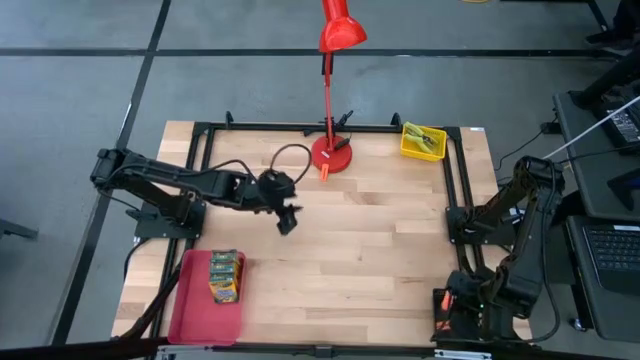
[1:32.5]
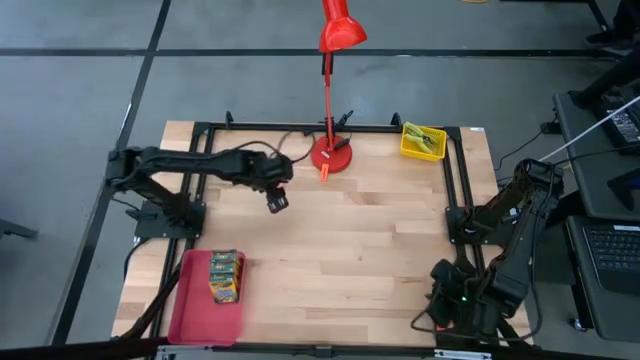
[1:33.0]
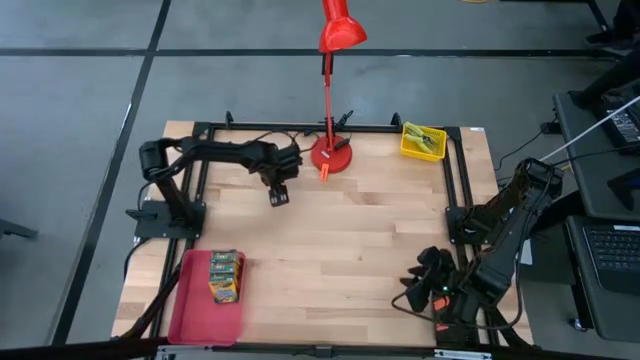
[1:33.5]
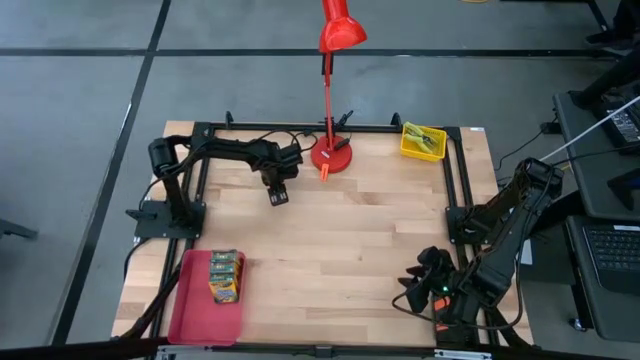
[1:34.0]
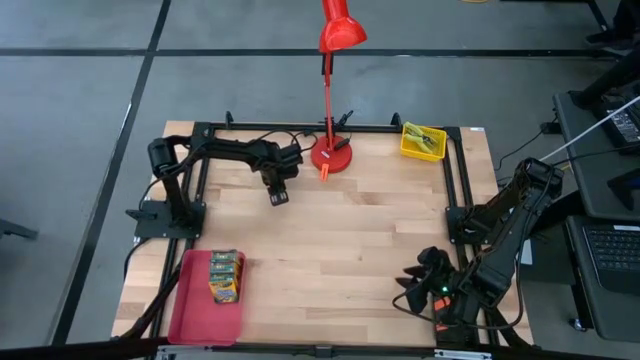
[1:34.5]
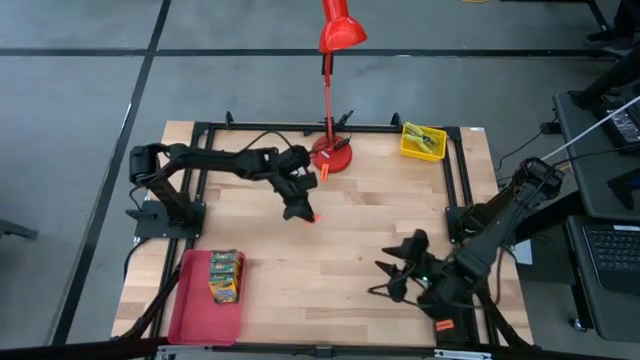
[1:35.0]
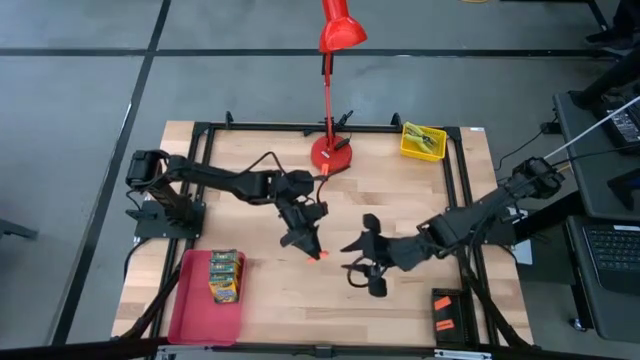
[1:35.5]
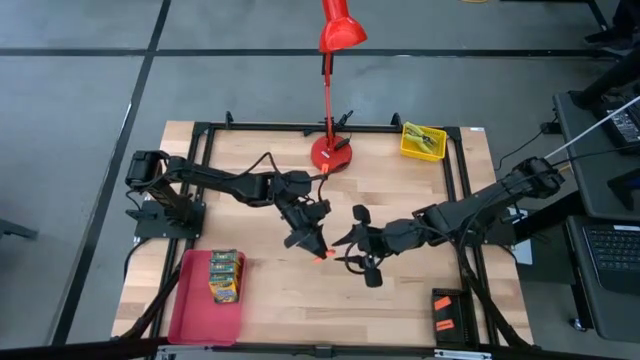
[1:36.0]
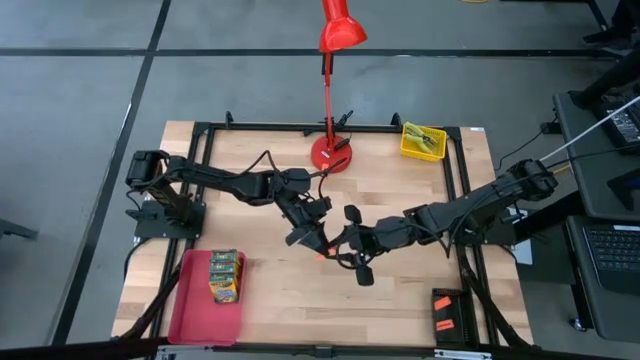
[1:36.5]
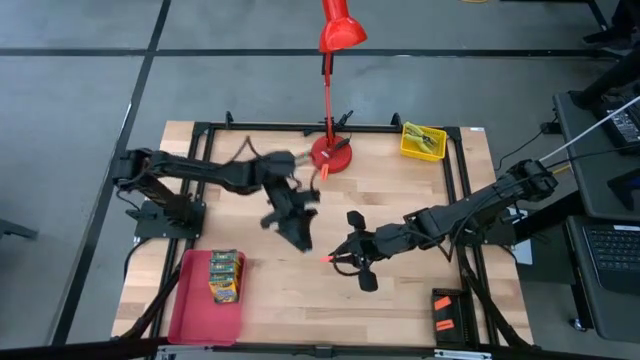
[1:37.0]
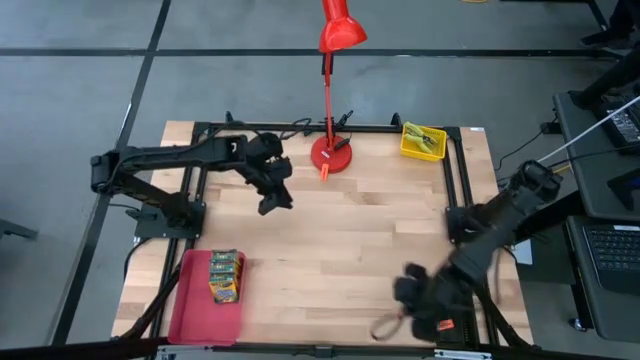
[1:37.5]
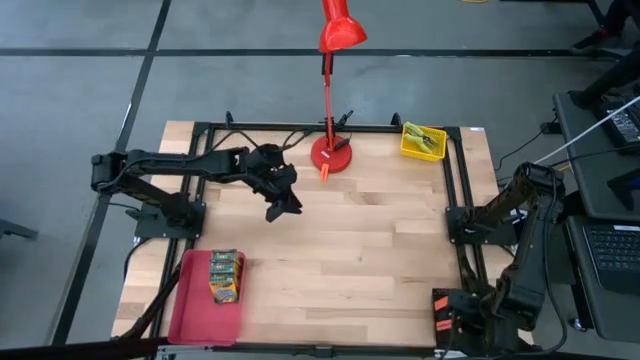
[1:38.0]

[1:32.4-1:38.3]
Task: Pick & Place School Supplies
Put the eraser into the black bin

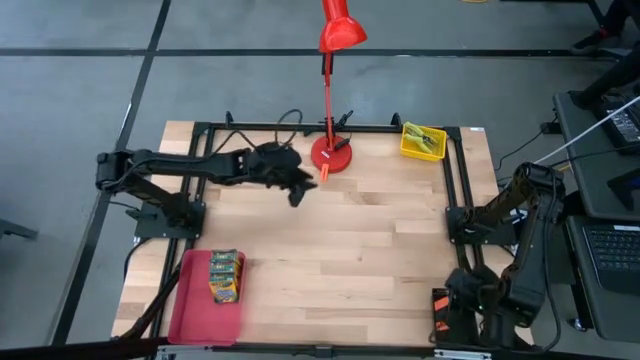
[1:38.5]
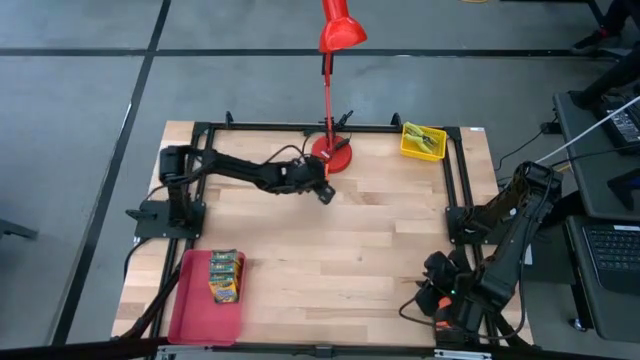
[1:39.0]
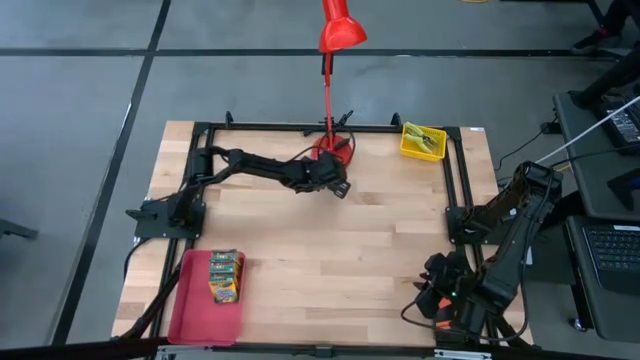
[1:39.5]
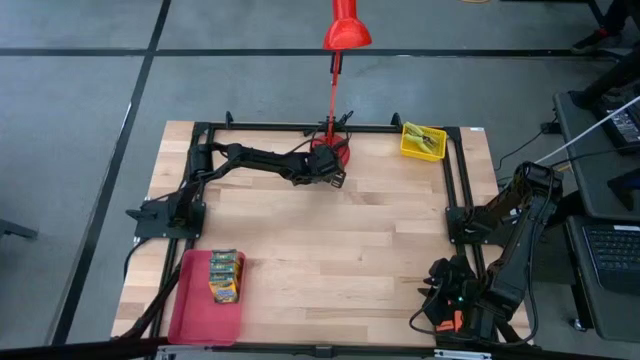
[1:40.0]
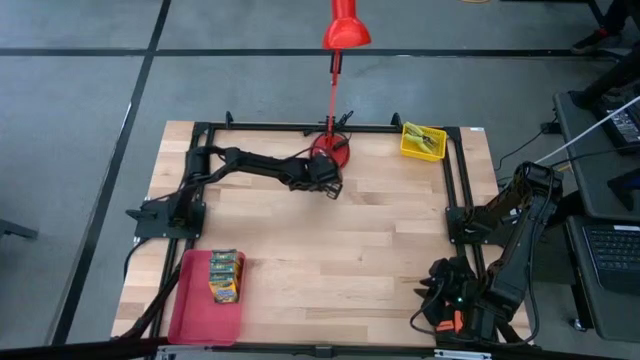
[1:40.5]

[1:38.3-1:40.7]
Put the orange eraser into the black bin

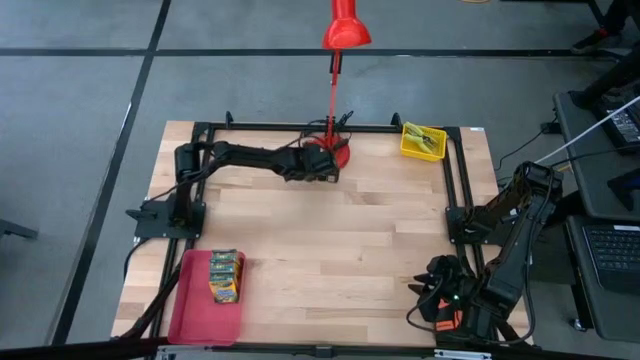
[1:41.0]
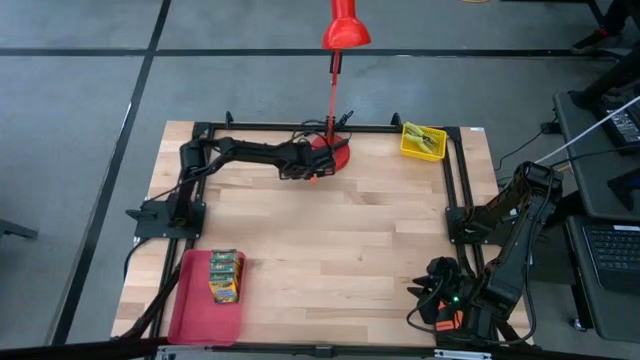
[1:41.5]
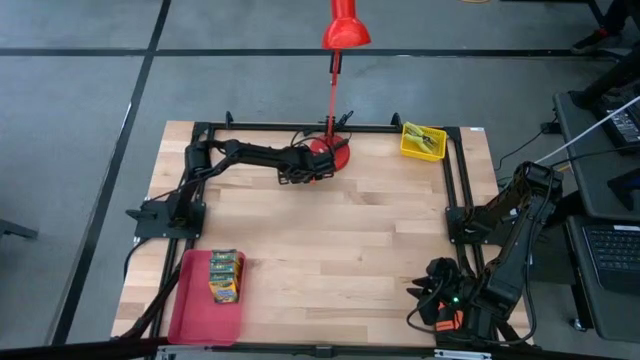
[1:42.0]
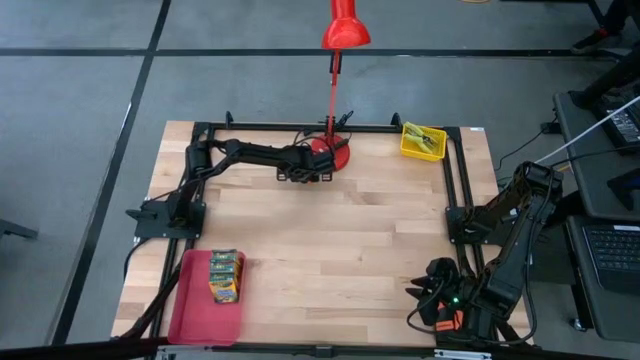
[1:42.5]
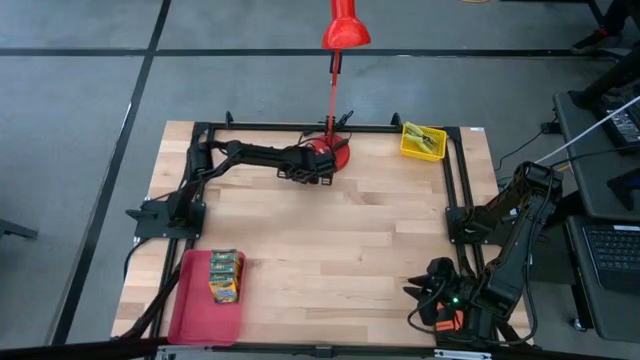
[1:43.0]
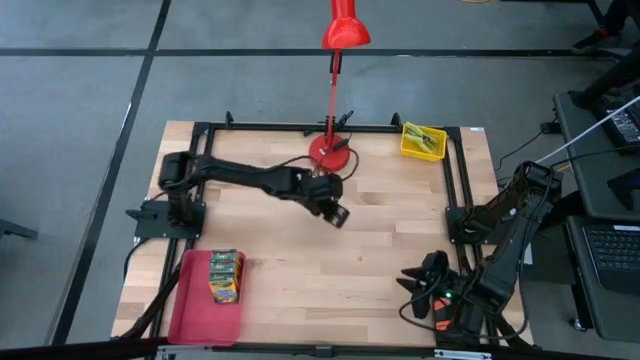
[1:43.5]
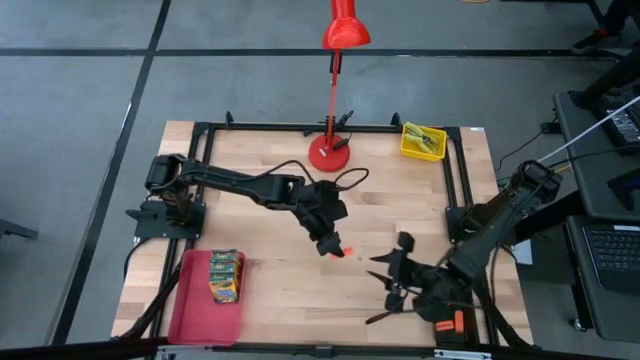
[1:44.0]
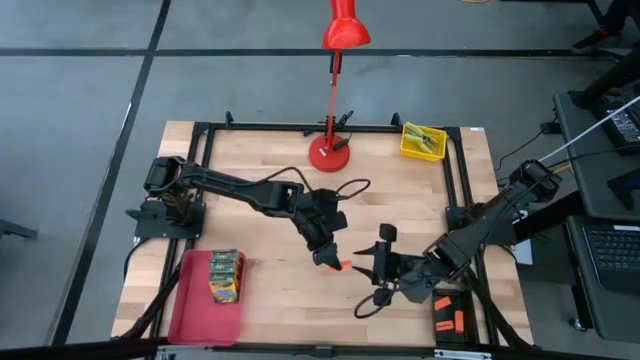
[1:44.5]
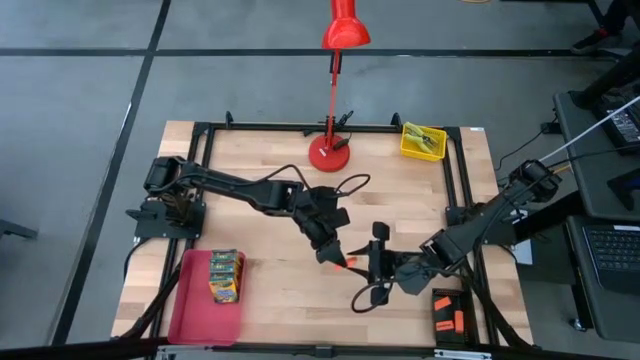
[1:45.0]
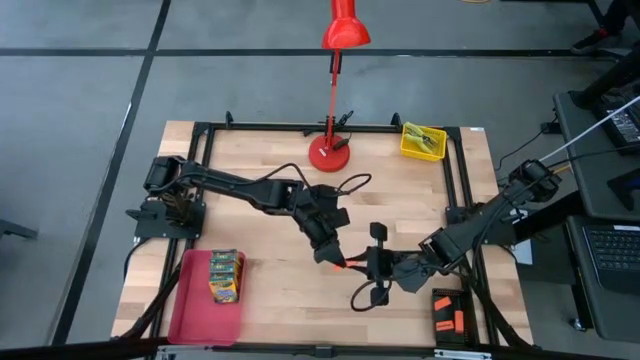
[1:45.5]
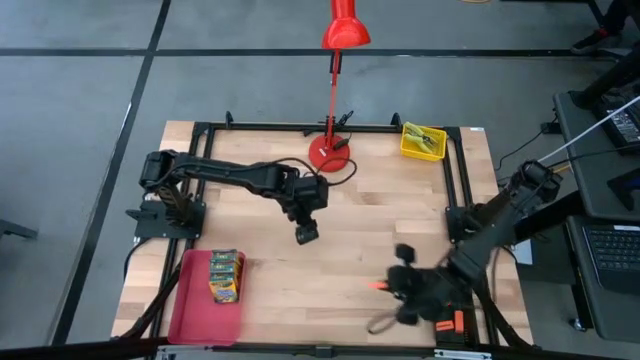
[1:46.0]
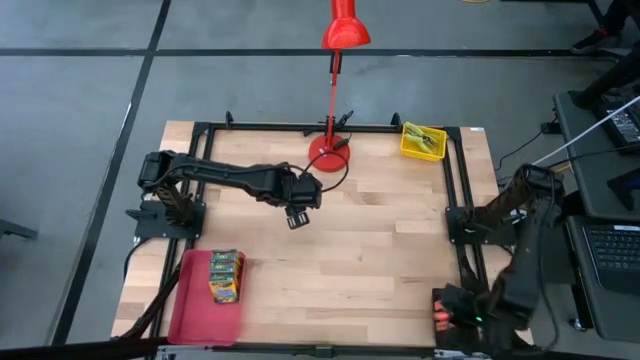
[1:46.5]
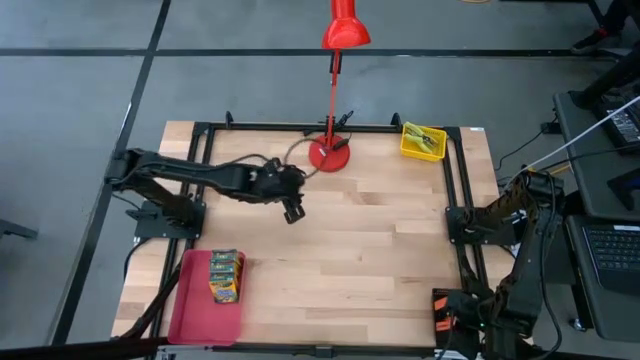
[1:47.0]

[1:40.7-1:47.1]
Put the orange eraser into the black bin

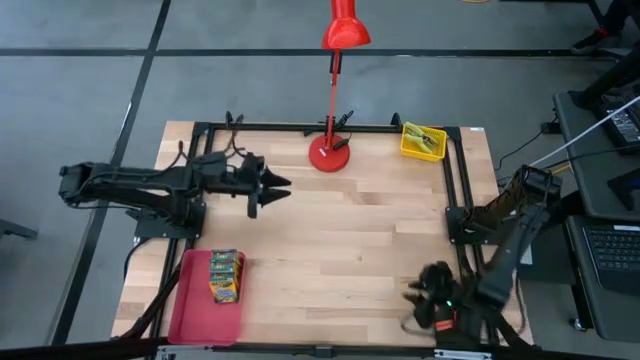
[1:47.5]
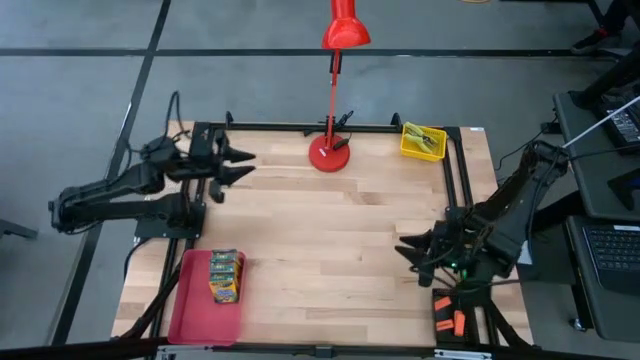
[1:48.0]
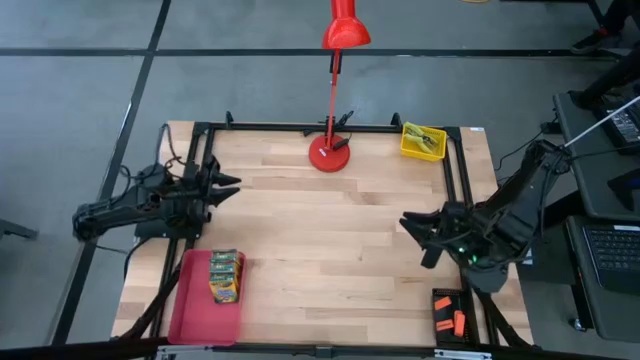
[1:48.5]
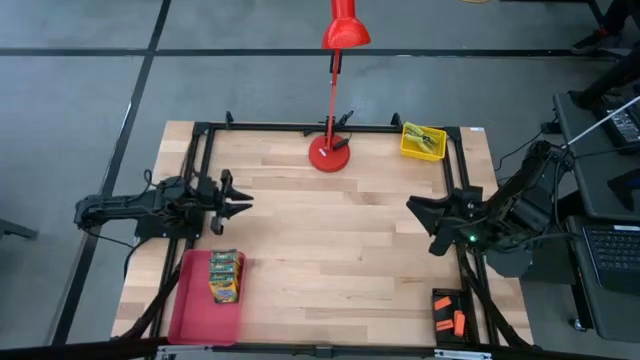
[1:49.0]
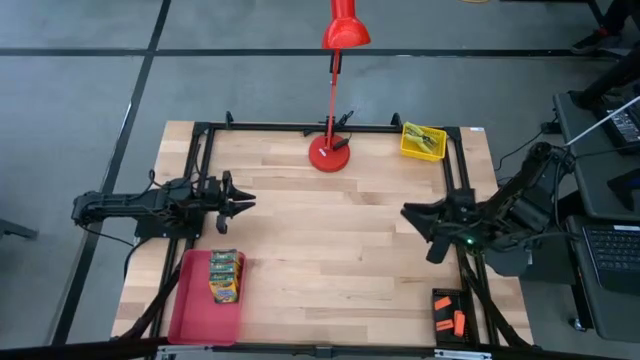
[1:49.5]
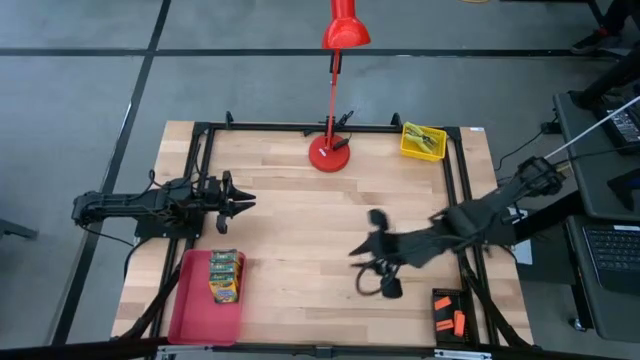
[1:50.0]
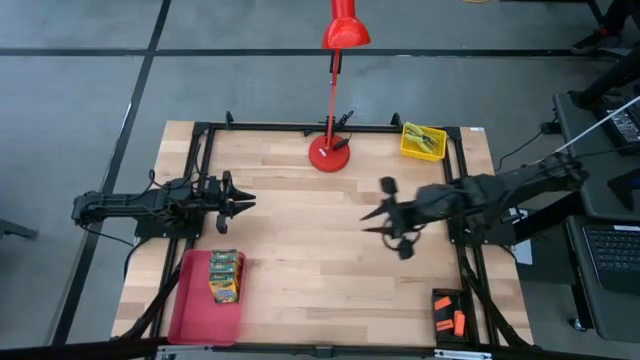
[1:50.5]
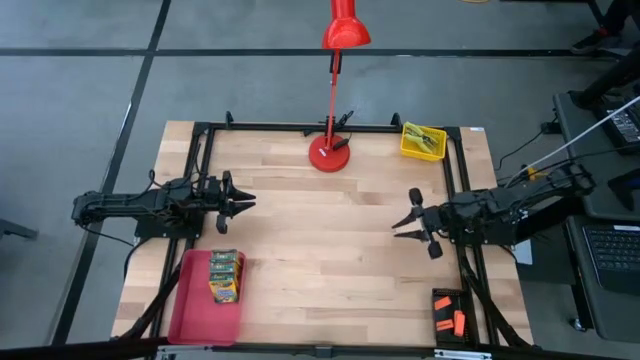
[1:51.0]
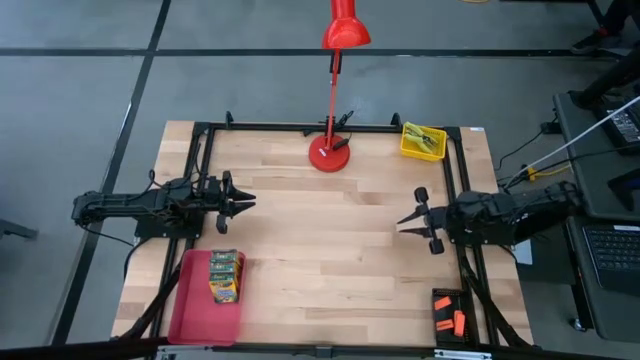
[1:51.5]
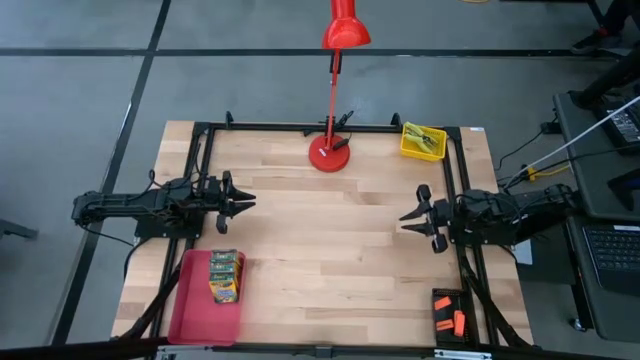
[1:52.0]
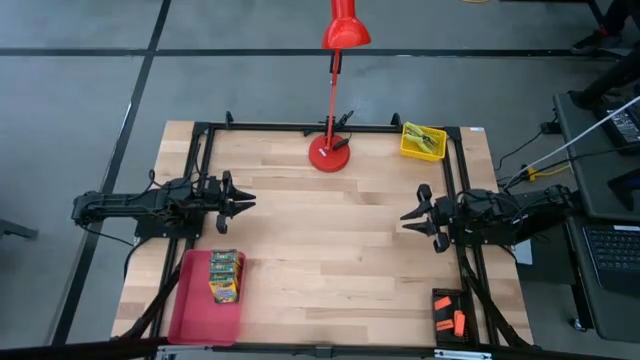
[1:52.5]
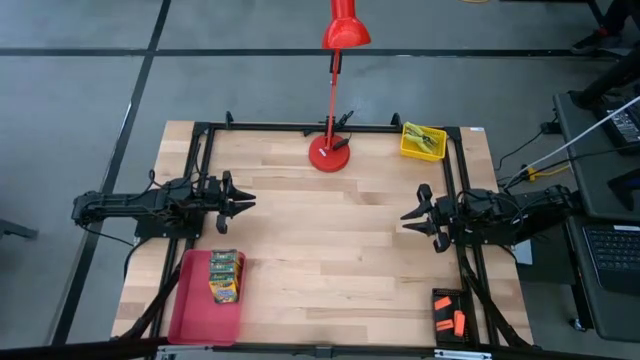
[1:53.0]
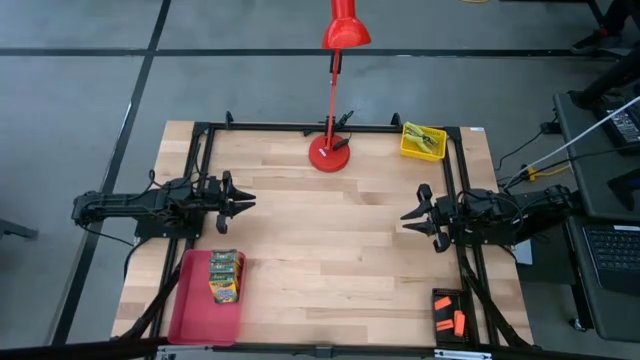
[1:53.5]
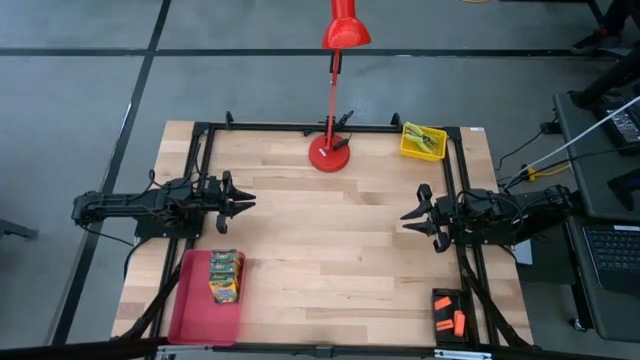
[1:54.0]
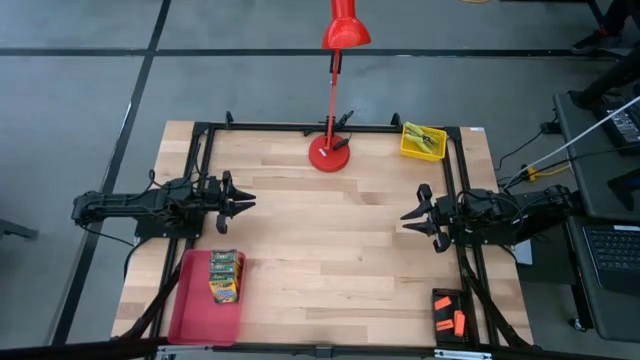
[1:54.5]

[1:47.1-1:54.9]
Return to Home Position
